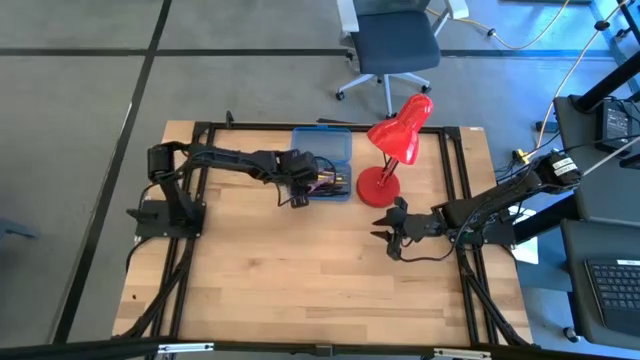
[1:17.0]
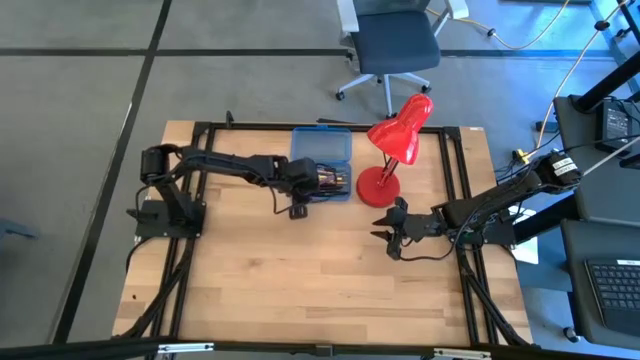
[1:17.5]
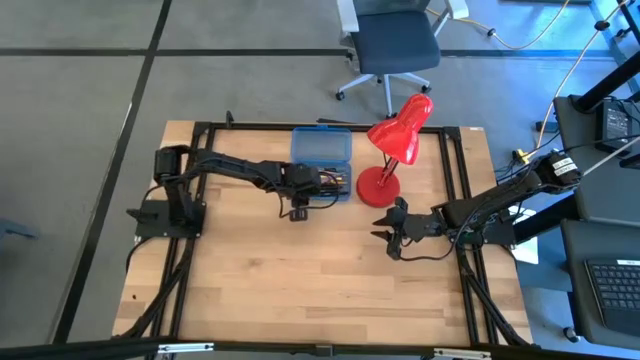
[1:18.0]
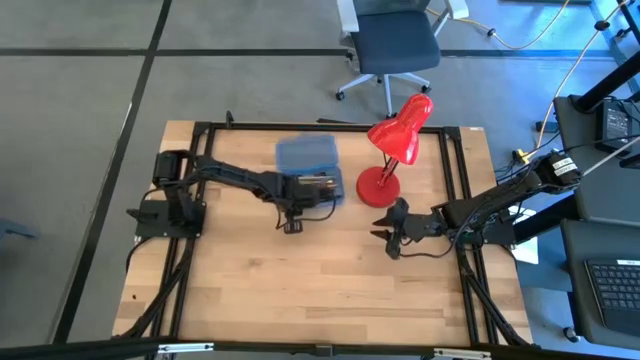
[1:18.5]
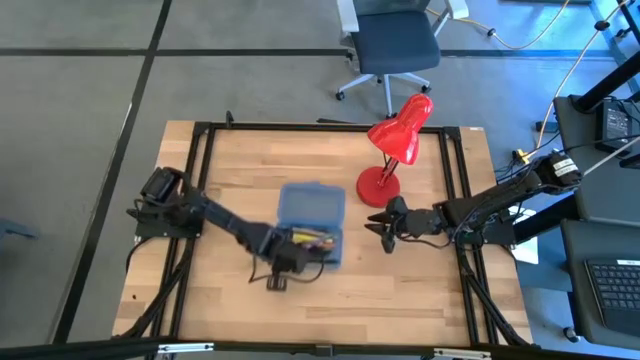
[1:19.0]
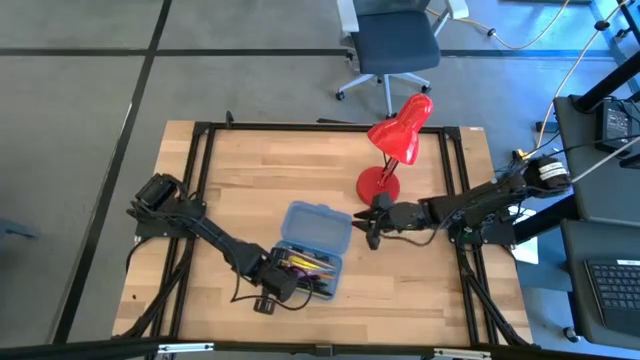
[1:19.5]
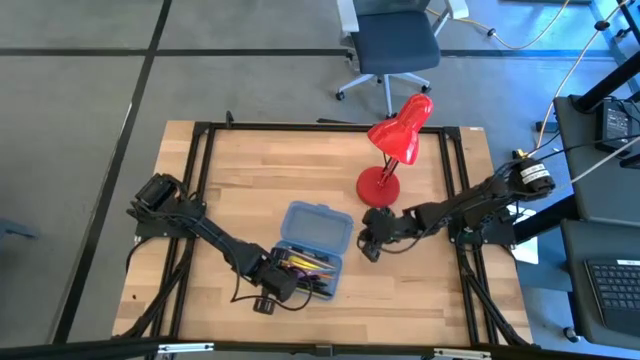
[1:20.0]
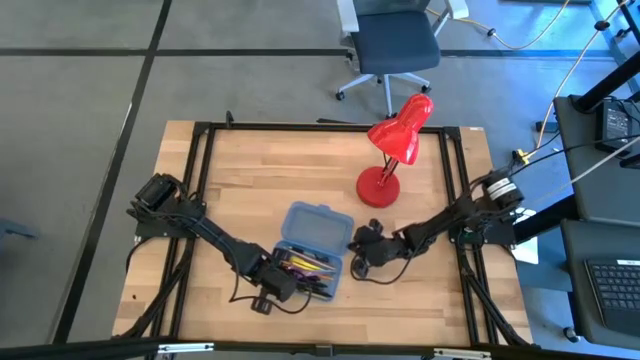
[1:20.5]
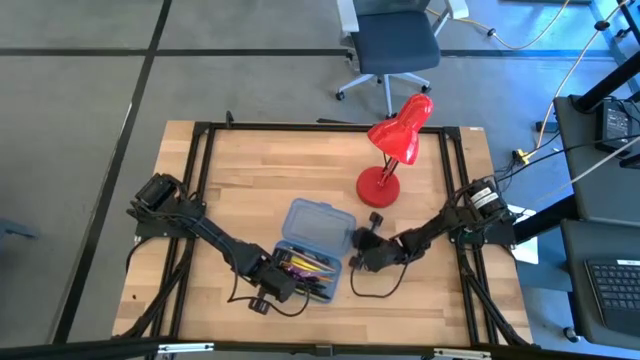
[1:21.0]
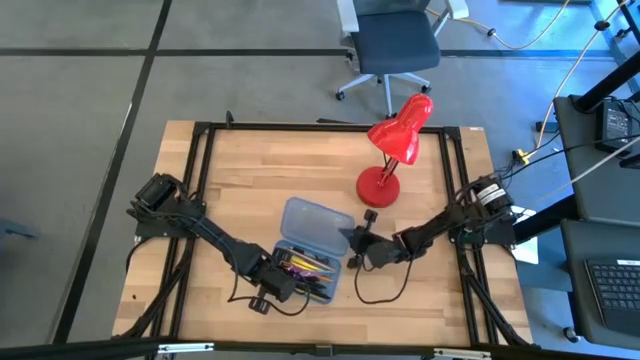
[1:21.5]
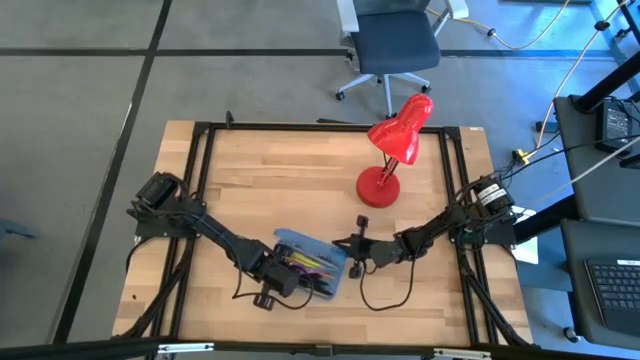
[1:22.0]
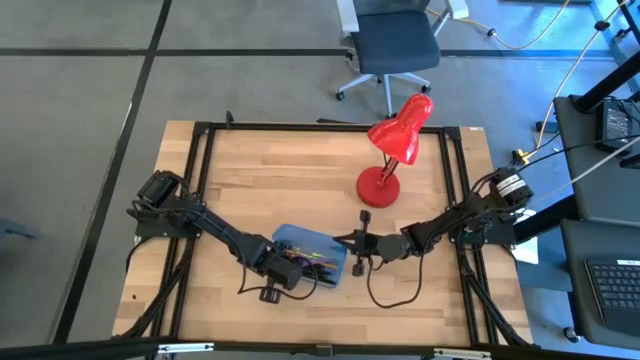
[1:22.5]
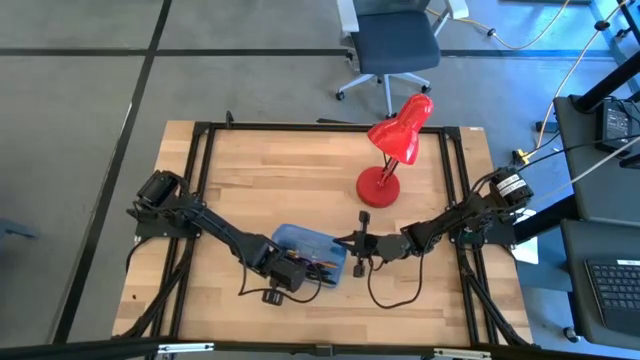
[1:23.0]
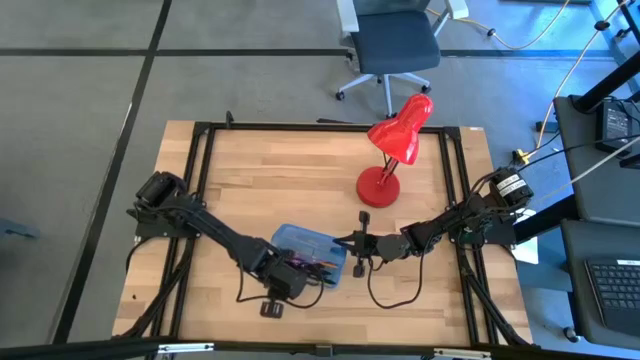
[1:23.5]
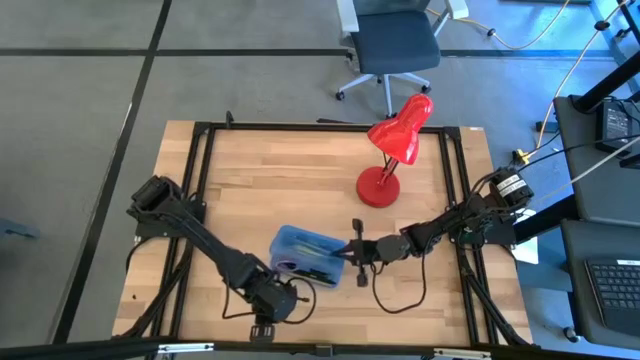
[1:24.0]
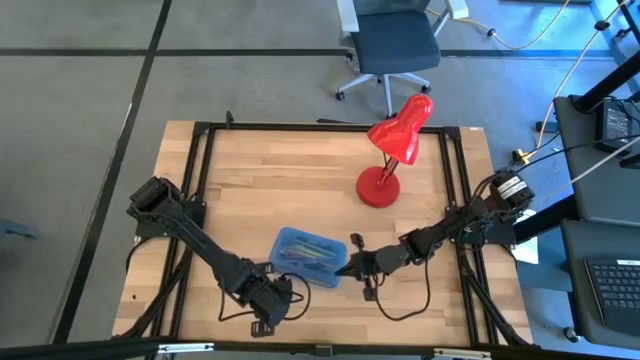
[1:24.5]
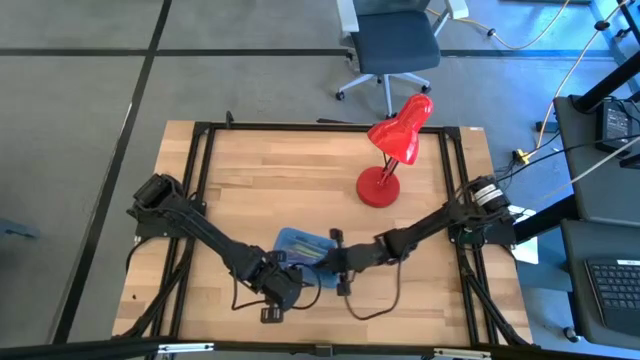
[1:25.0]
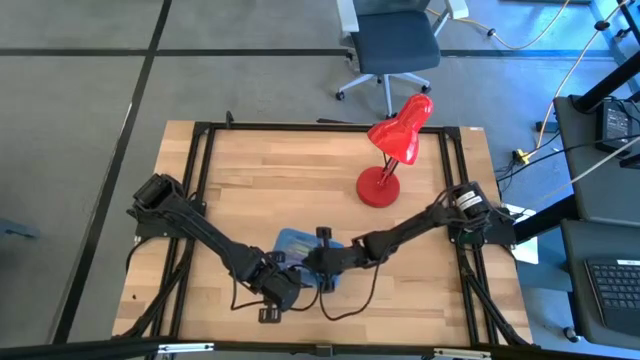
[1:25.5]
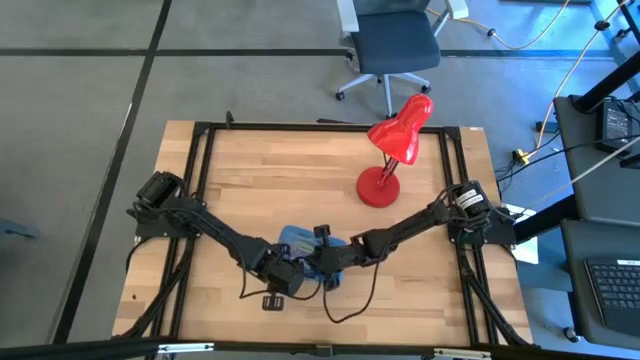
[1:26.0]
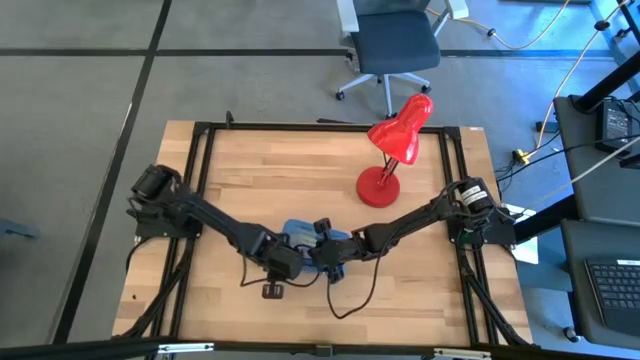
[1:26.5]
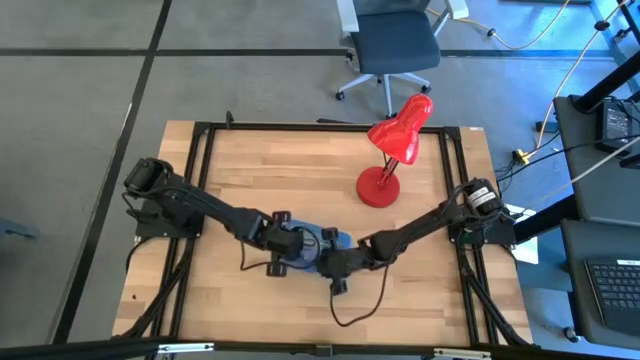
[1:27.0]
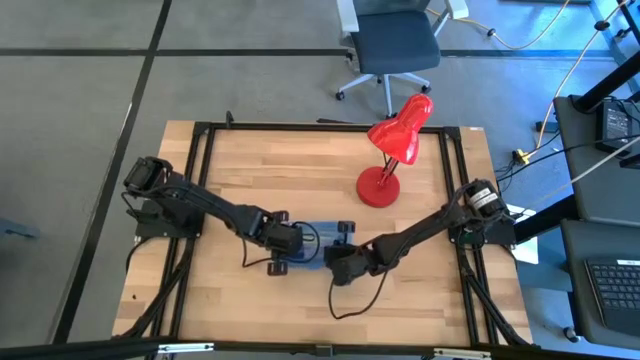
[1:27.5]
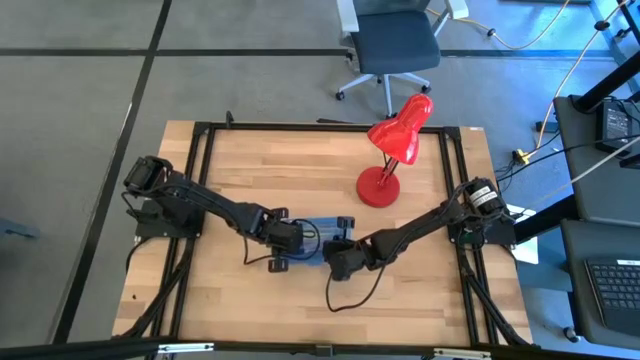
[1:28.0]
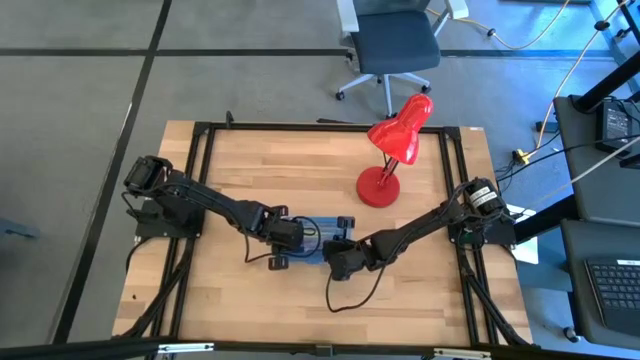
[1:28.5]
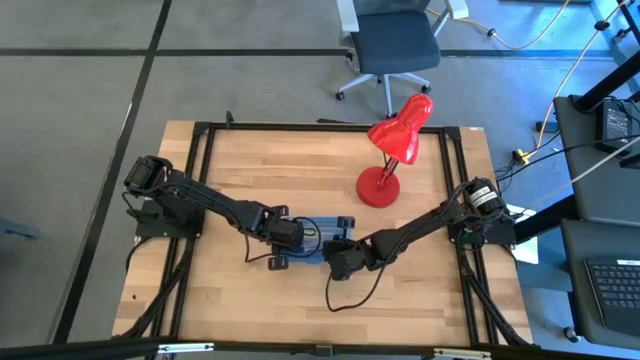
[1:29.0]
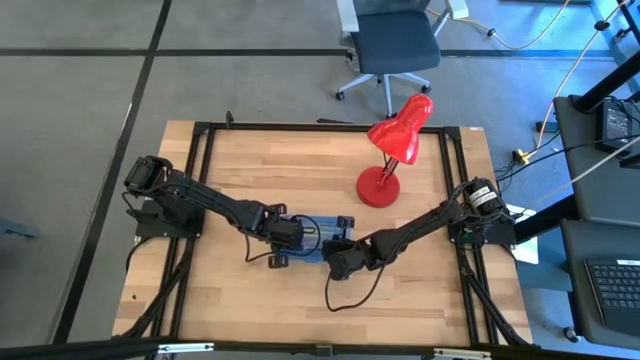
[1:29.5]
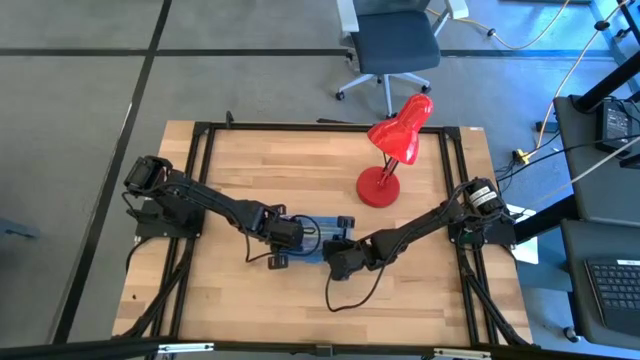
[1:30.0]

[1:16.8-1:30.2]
Task: Pick & place school supplies into a supply box
Close the blue supply box

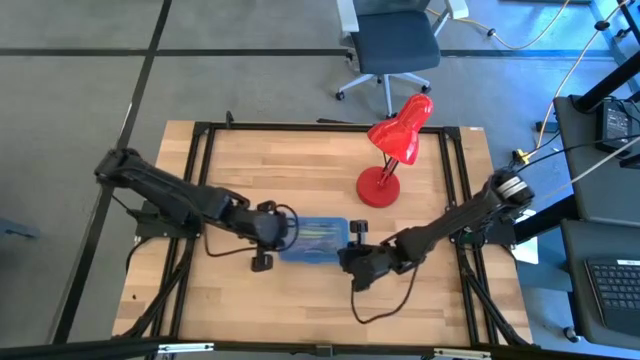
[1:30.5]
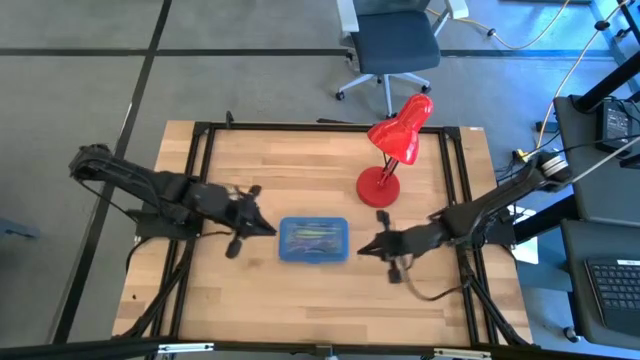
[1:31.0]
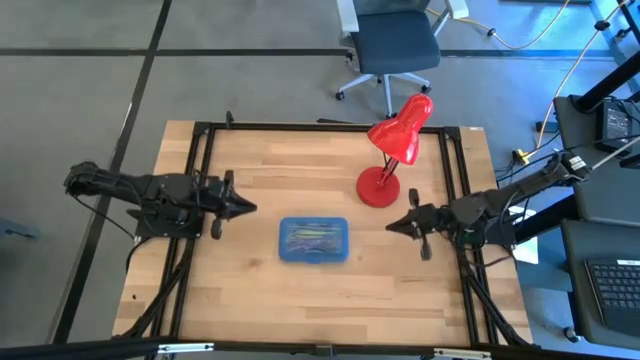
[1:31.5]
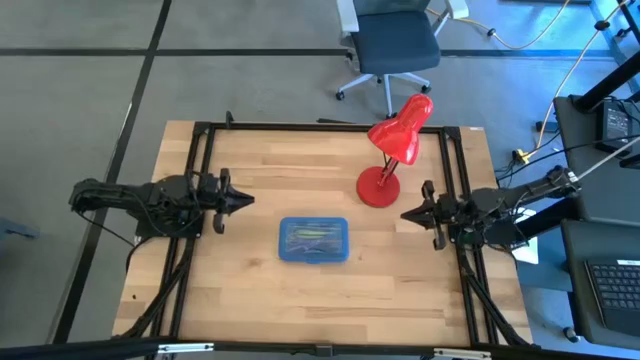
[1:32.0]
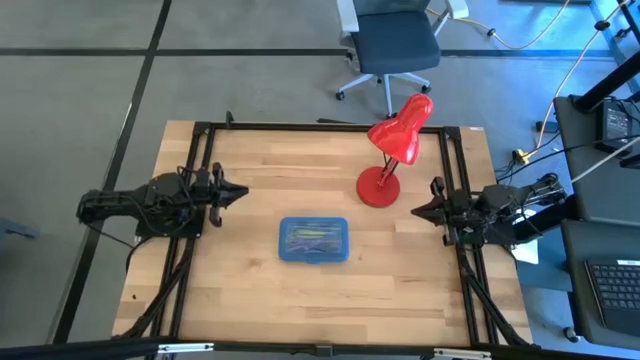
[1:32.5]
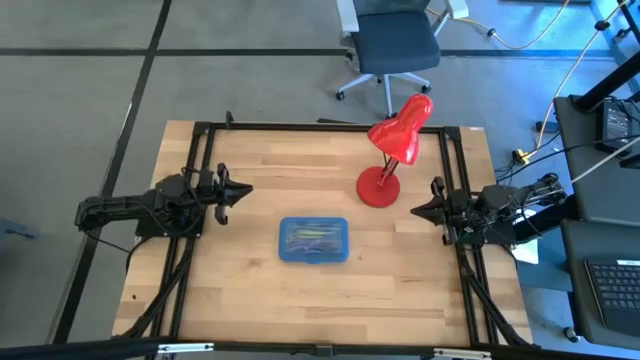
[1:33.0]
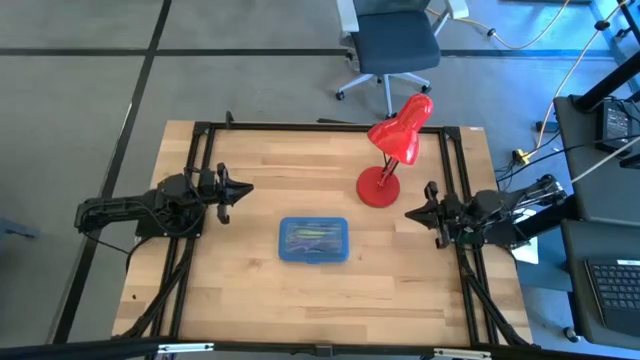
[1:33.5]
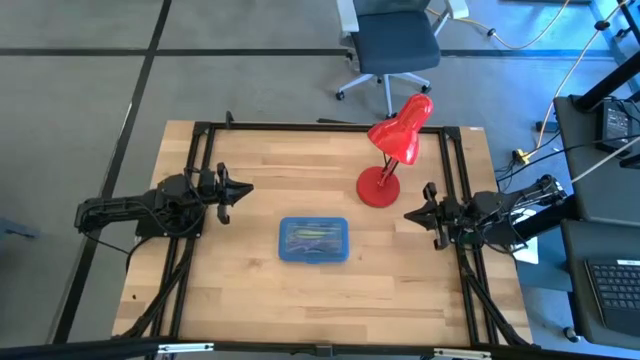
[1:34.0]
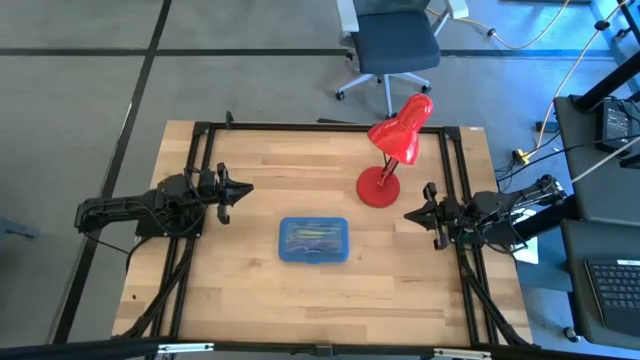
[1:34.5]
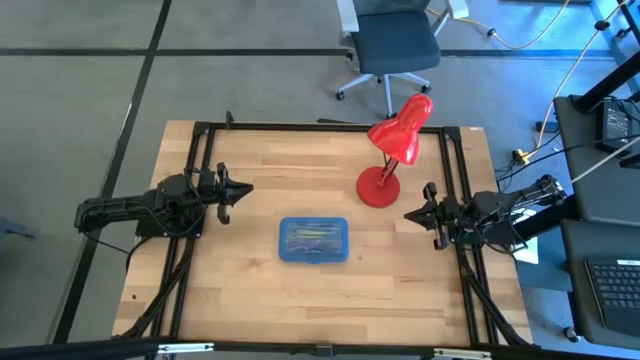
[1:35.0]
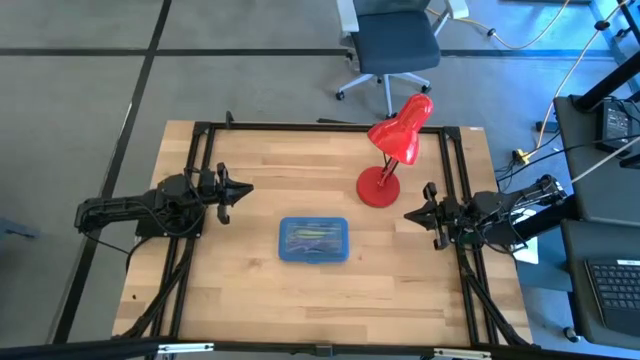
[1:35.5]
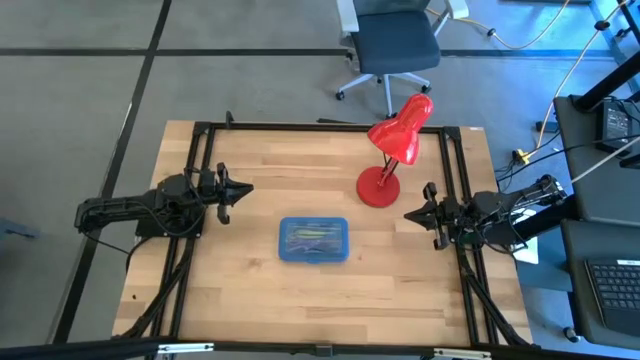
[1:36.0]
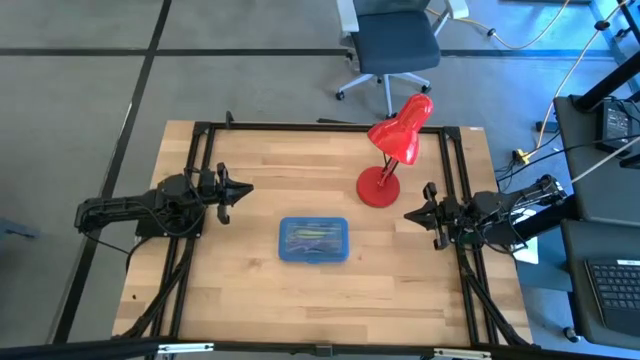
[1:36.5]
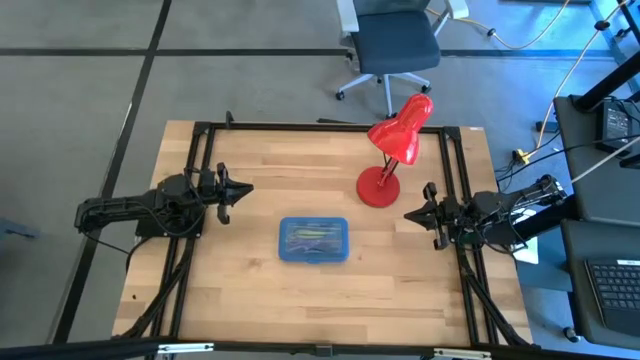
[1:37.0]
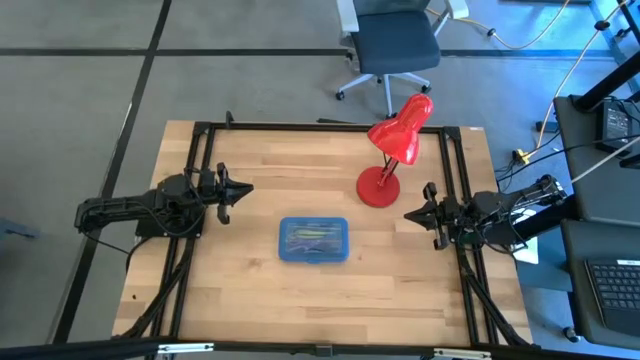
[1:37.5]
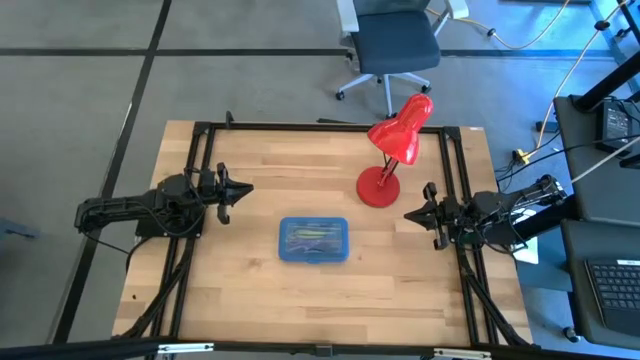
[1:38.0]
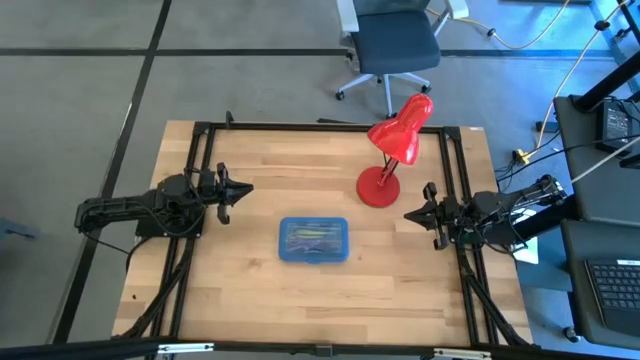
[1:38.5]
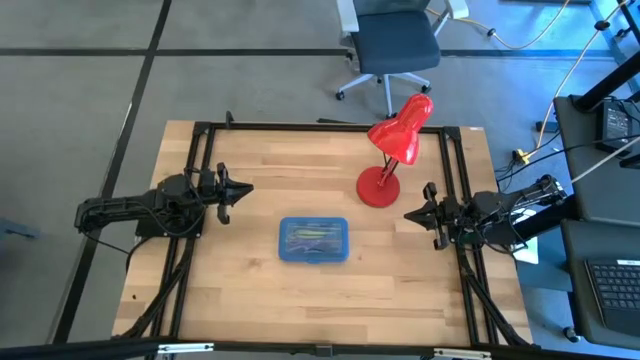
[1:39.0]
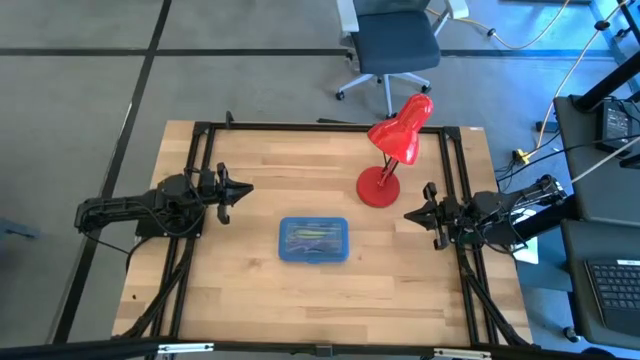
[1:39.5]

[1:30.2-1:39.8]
Return to Home Position
